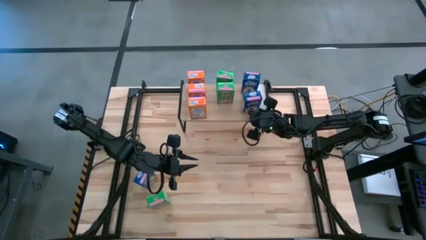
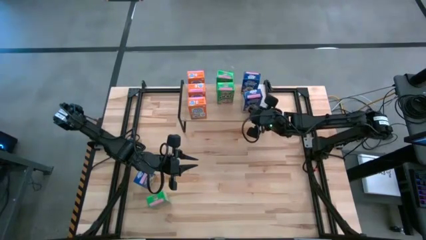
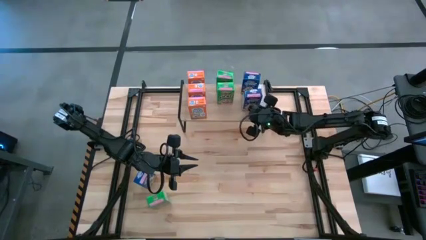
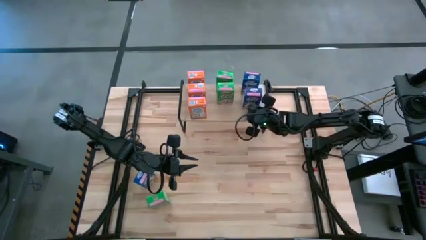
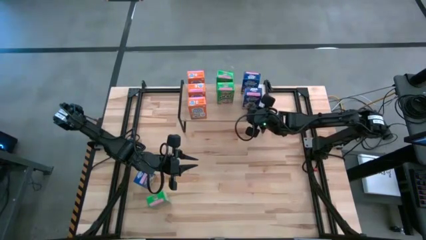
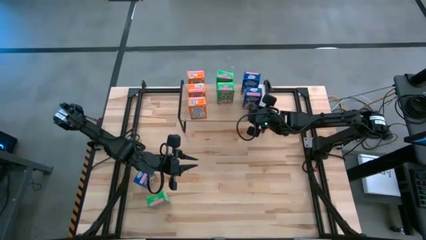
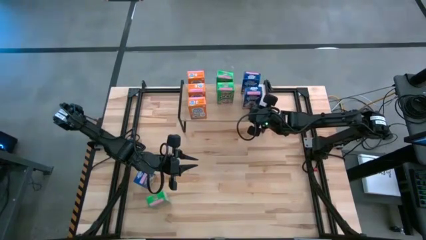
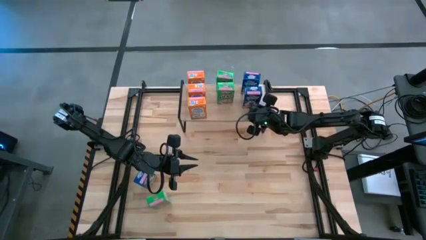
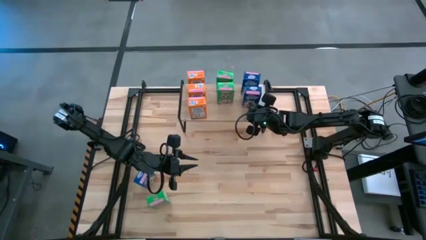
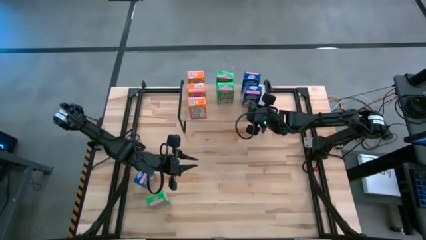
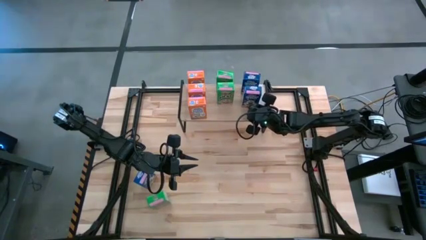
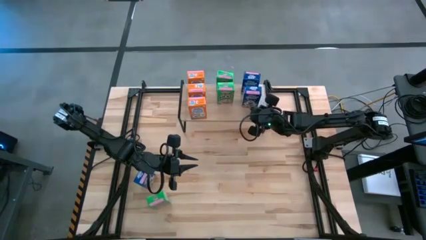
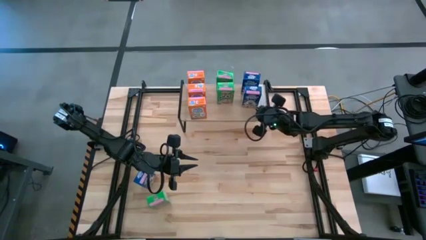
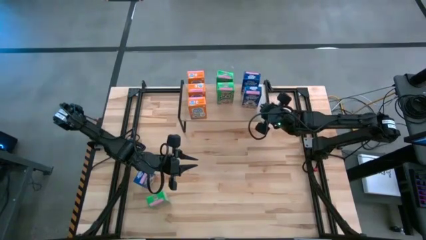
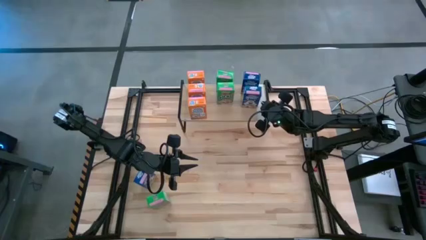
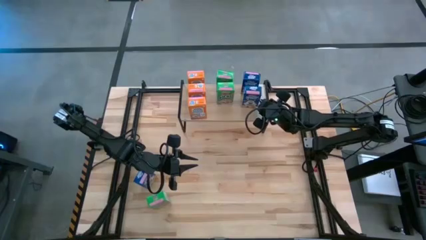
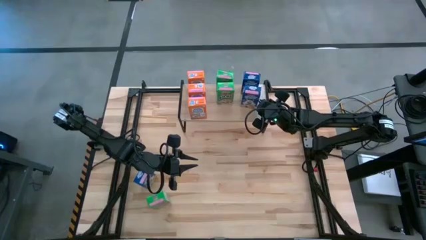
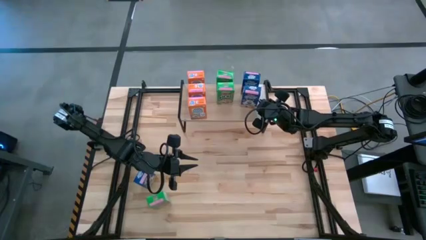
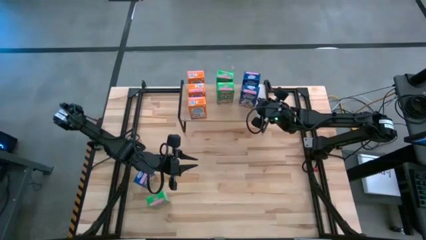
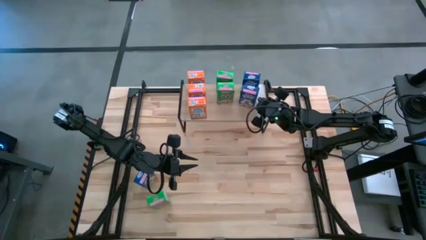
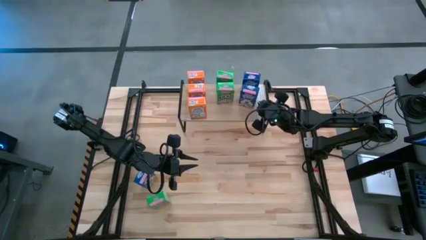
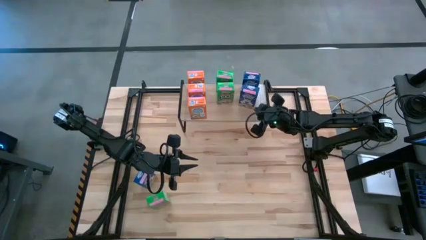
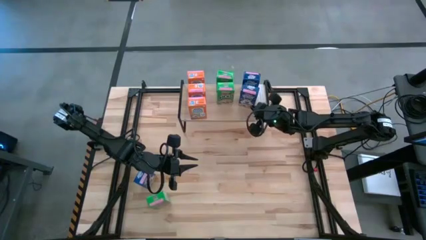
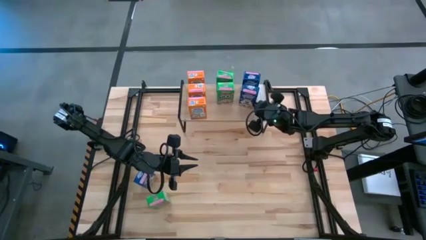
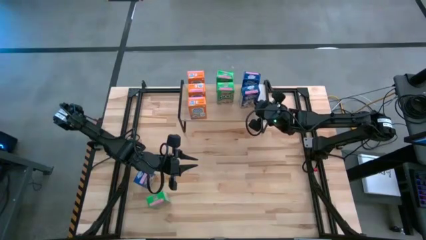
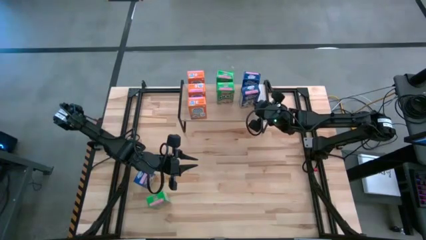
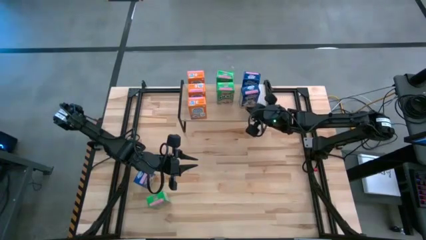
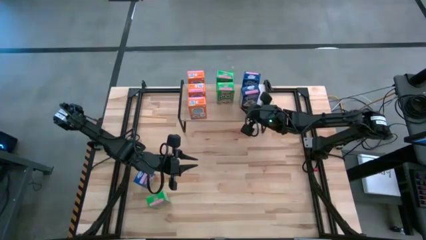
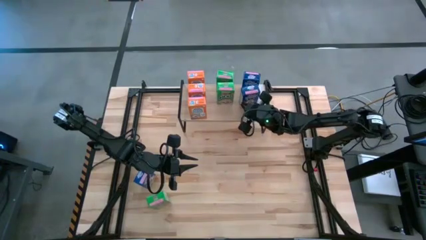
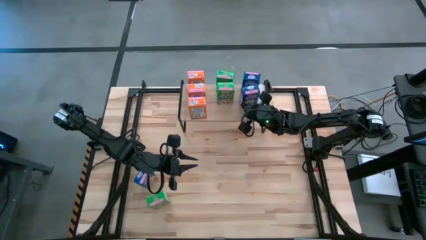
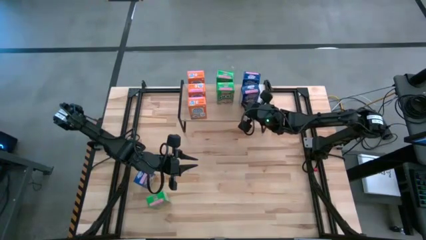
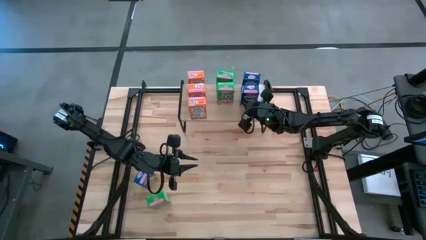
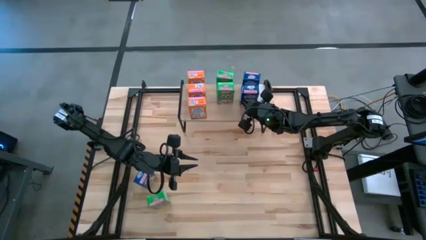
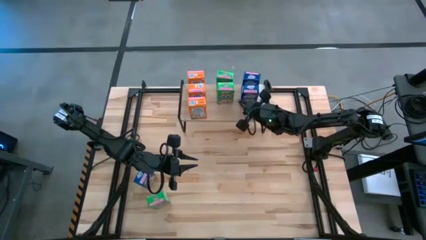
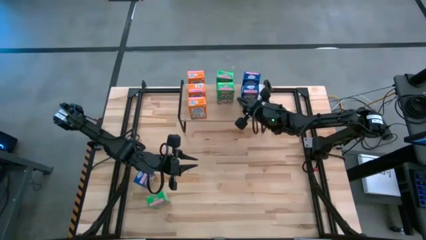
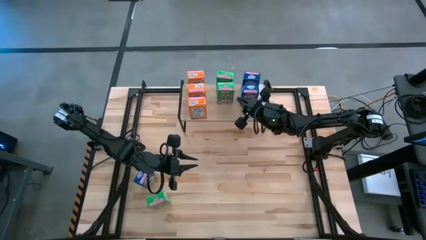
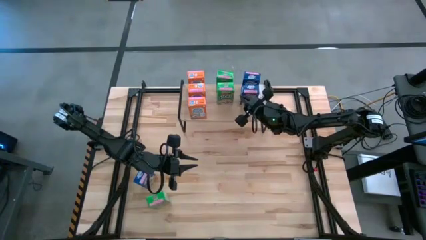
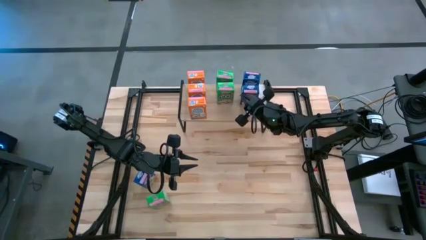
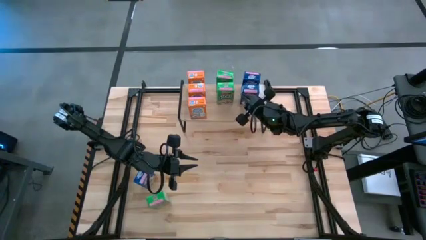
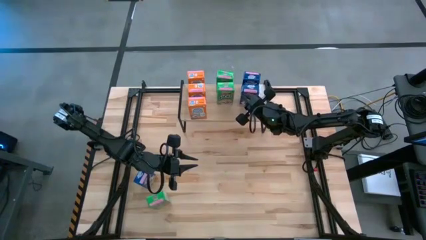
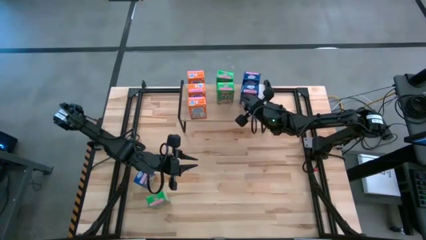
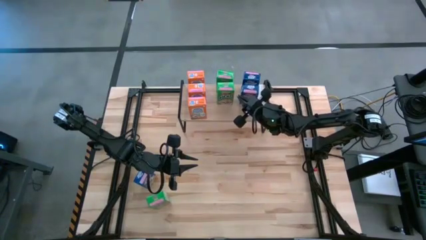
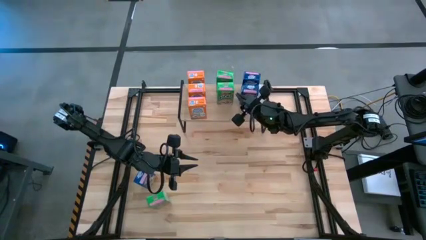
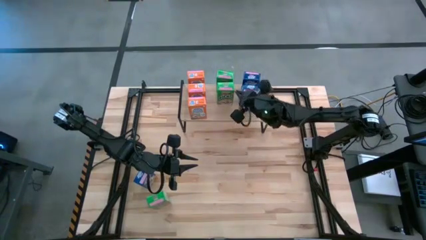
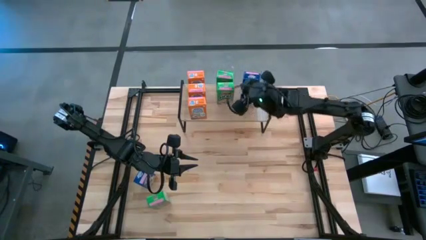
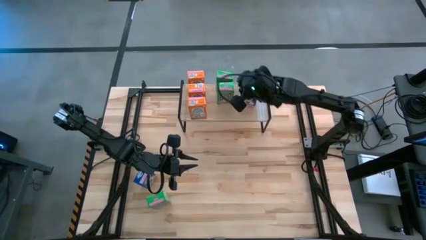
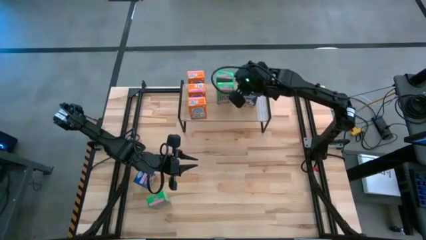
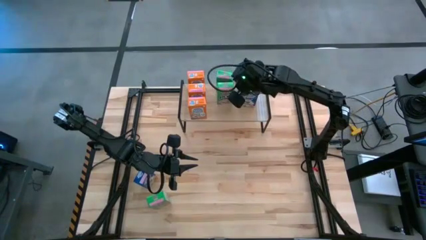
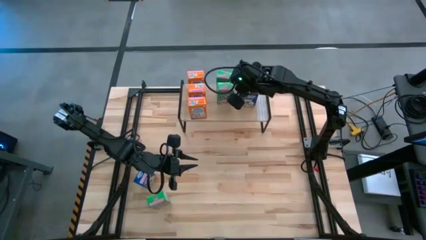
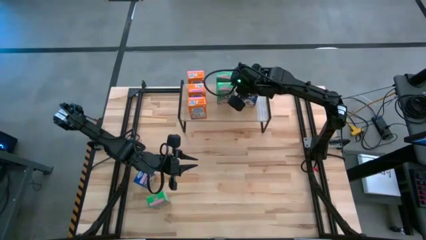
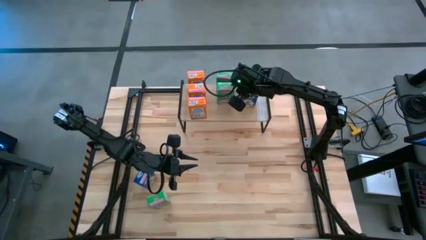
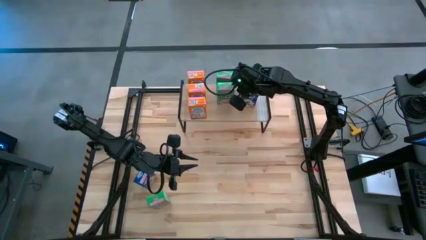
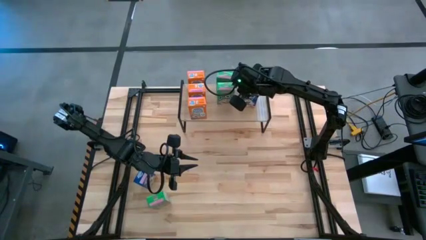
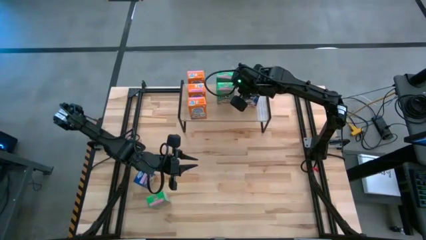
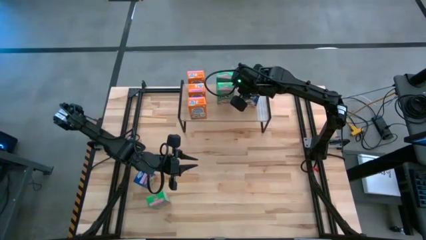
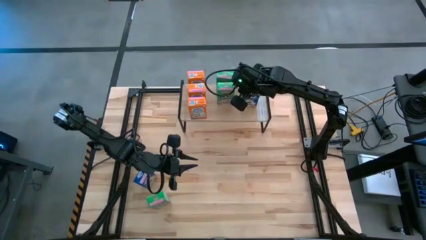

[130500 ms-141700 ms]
Task: Stack cereal on shelf
Put the right blue cereal box aligned with the other blue cereal box on the shelf
